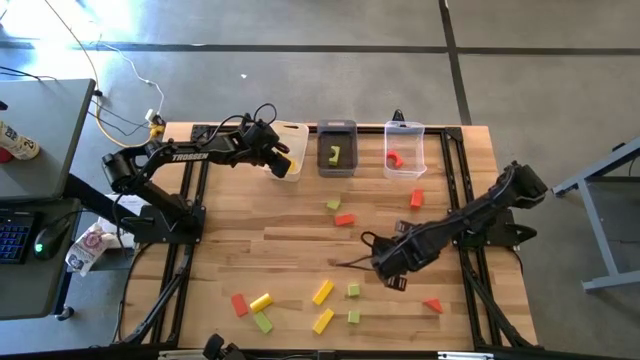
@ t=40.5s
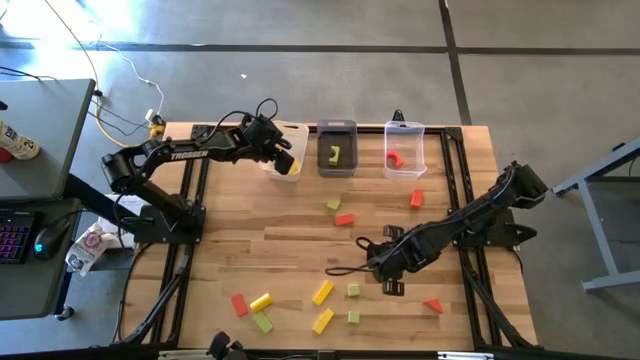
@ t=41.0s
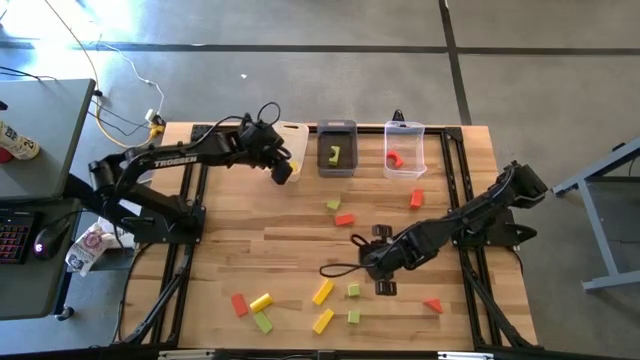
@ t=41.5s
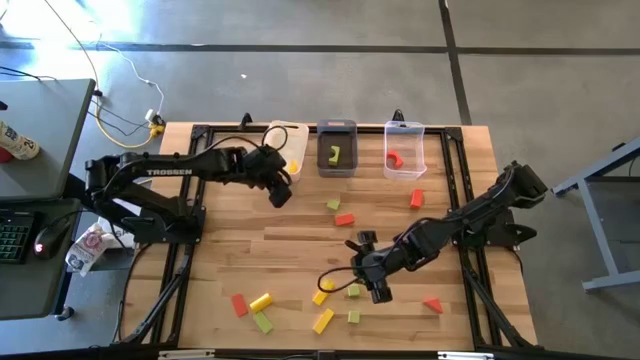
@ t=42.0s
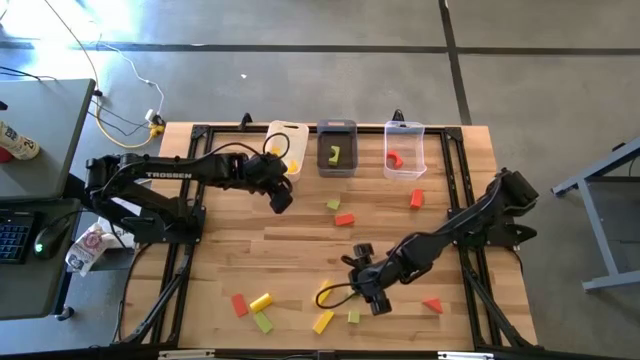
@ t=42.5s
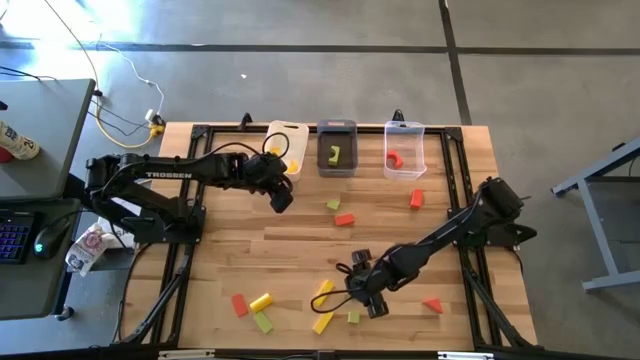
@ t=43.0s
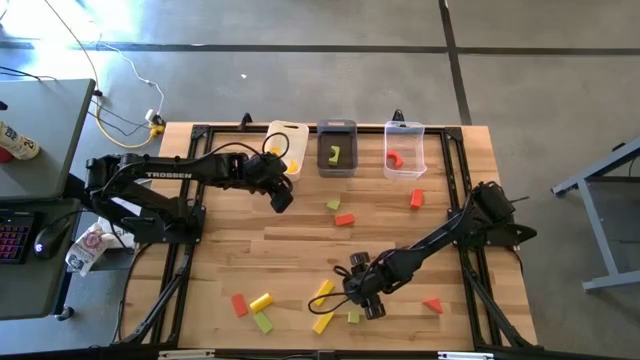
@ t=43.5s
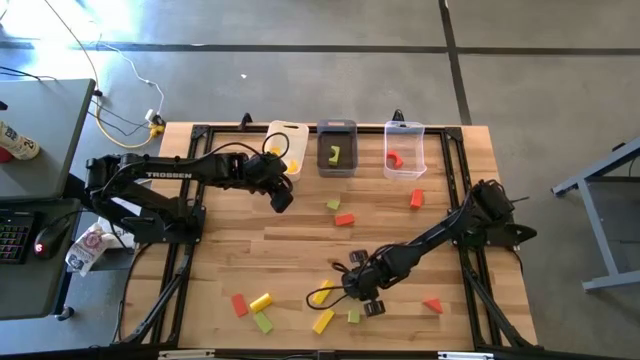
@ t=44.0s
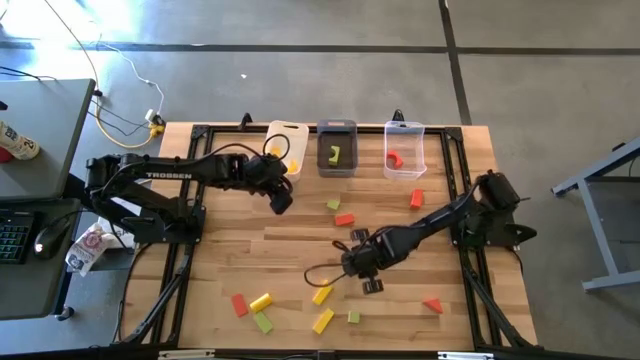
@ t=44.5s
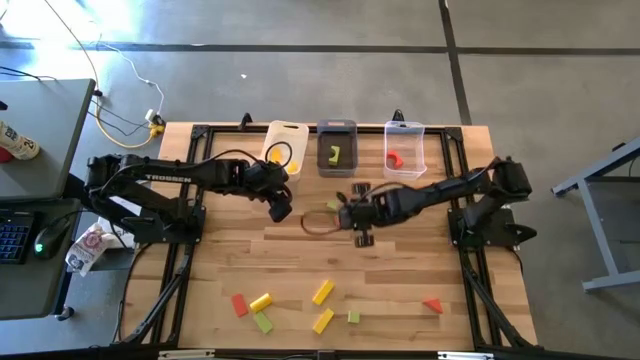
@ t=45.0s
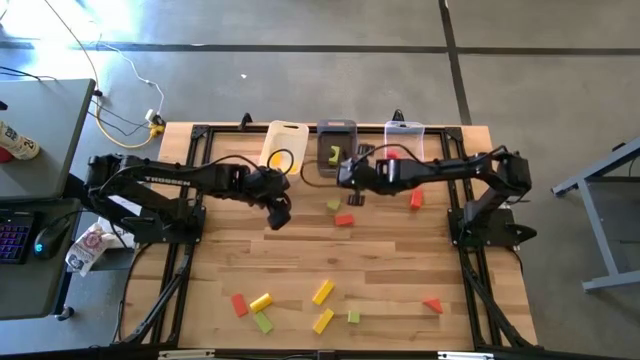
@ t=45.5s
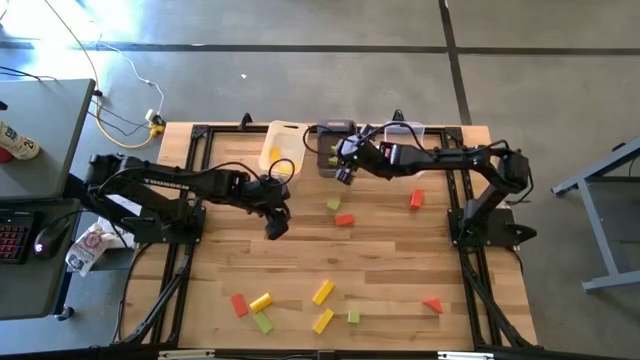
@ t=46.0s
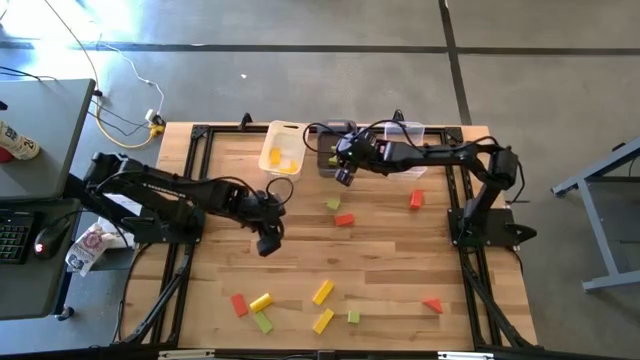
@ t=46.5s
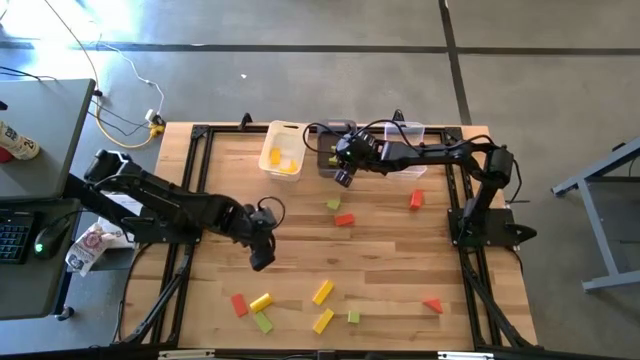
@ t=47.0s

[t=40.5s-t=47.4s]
Task: Sort & place blocks by color
Put the green block into the black bin

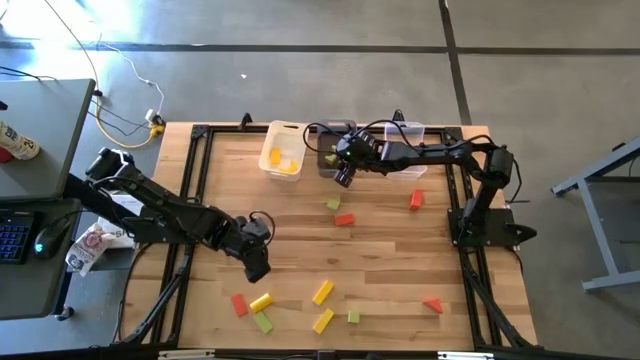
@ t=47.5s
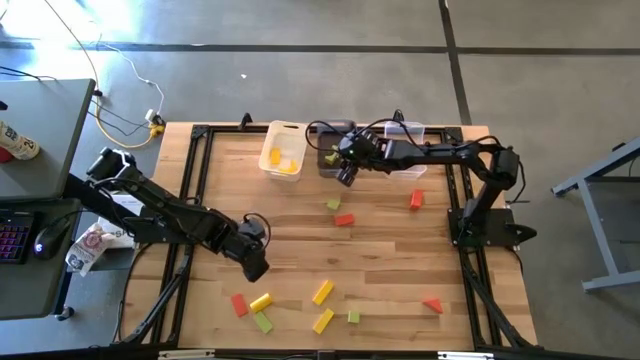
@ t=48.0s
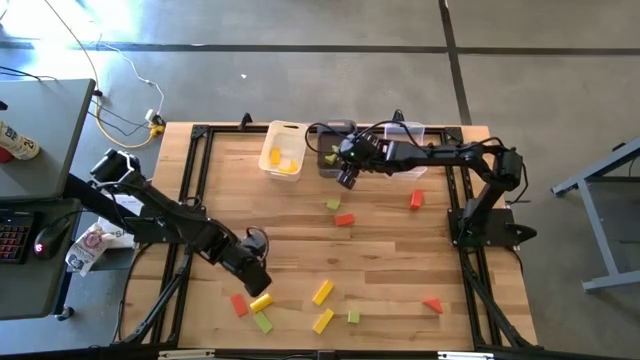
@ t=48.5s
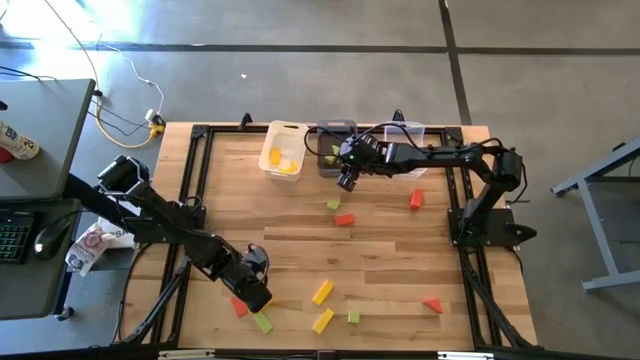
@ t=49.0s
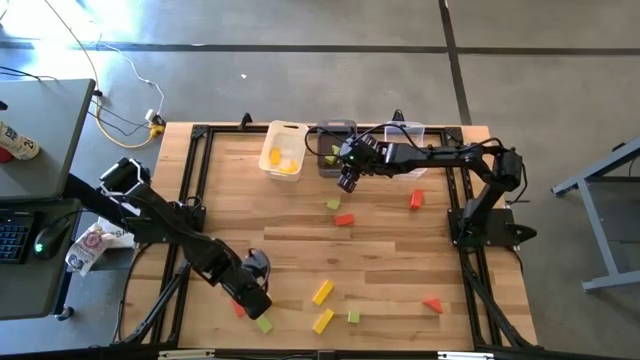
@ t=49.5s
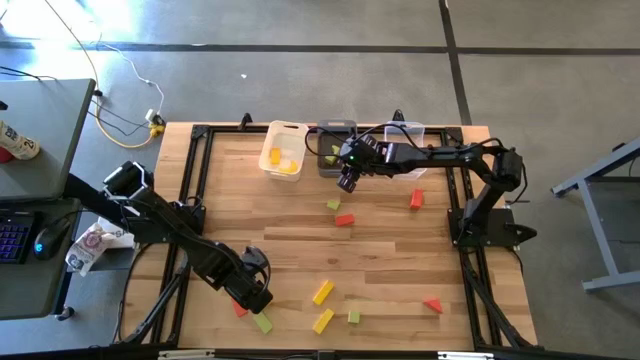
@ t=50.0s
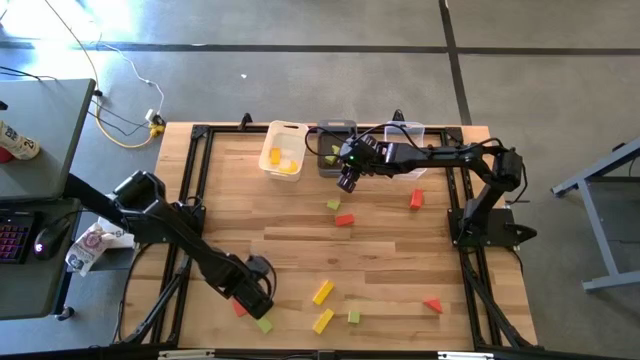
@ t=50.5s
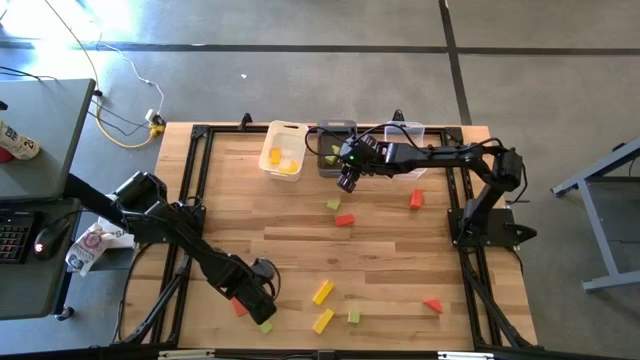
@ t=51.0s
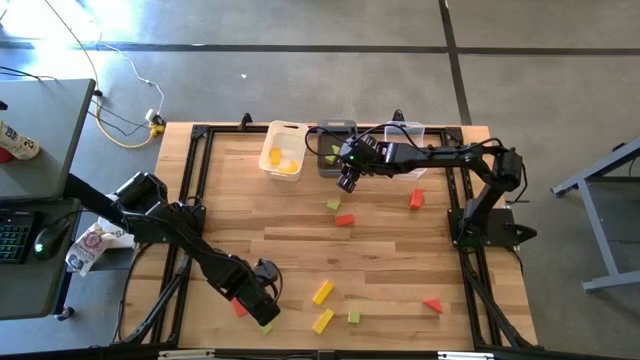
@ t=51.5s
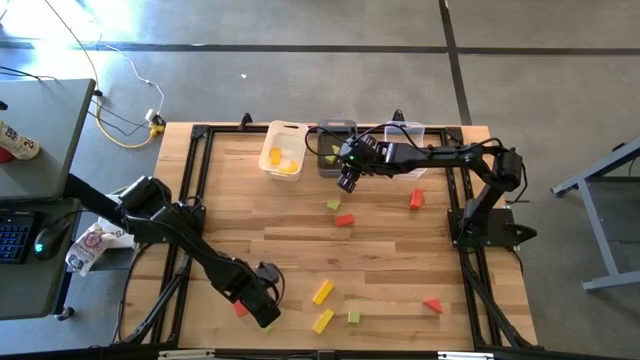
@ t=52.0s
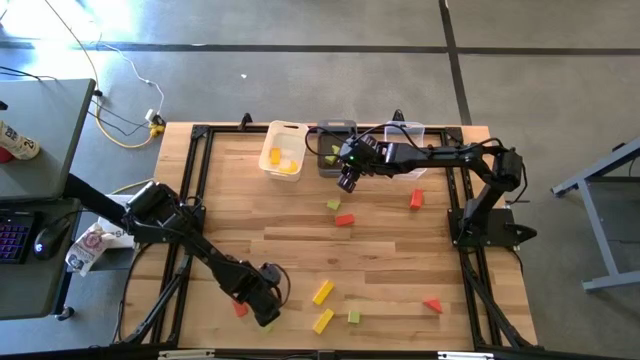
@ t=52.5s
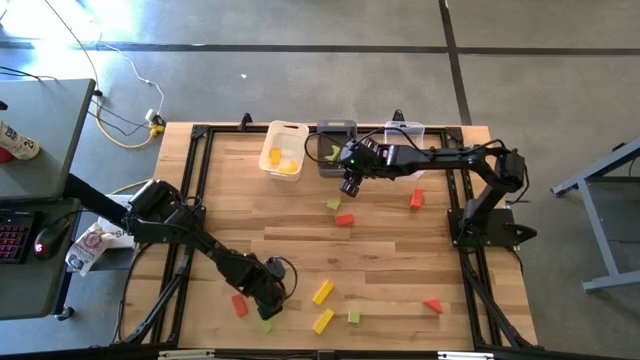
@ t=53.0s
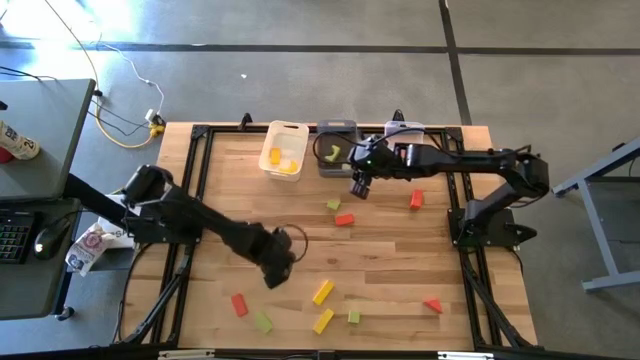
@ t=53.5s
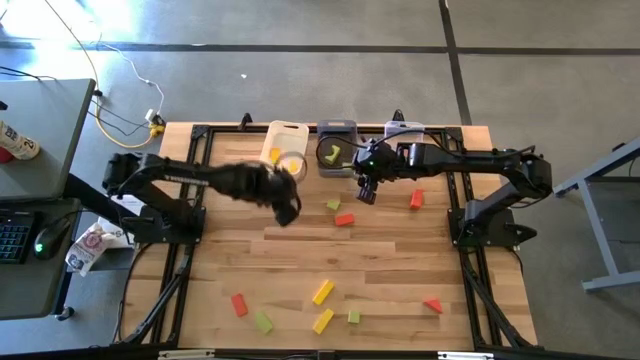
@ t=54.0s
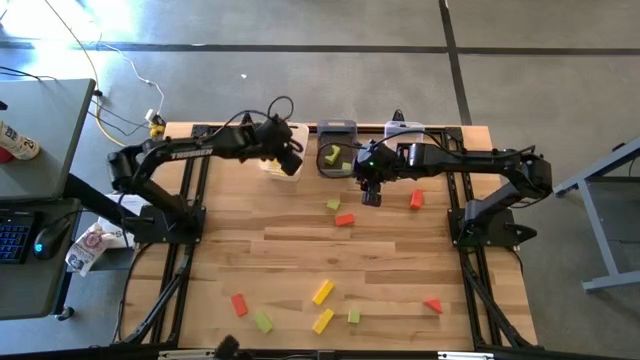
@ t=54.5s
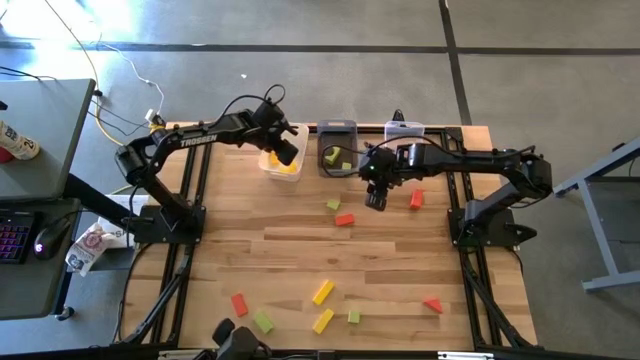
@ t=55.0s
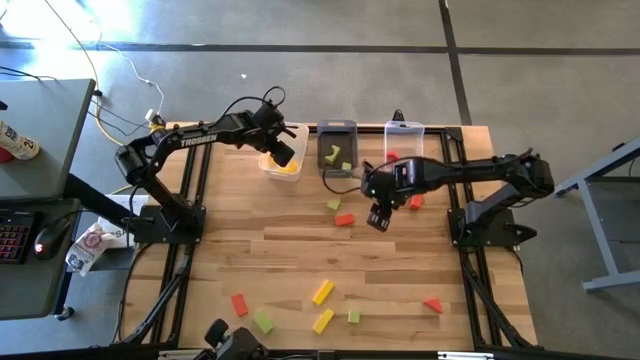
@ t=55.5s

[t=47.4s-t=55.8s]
Put the yellow block into the white bin

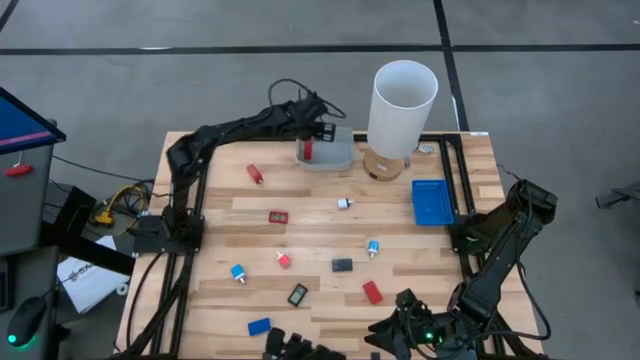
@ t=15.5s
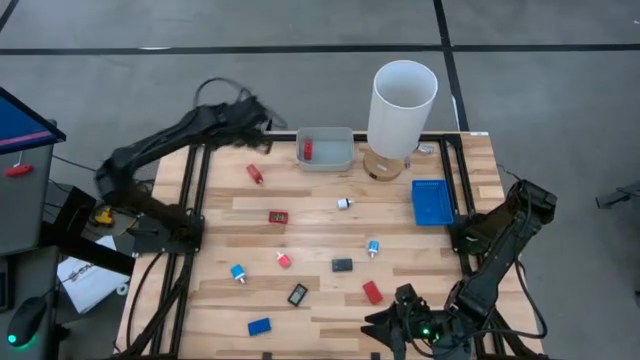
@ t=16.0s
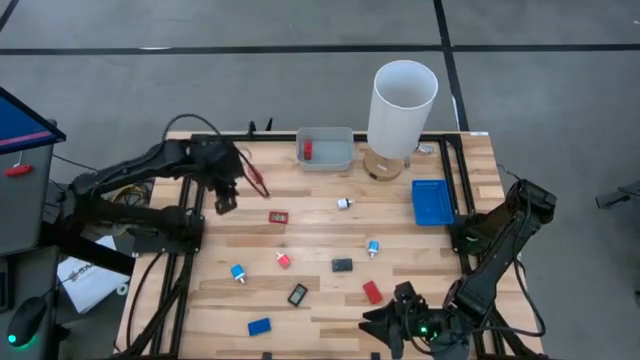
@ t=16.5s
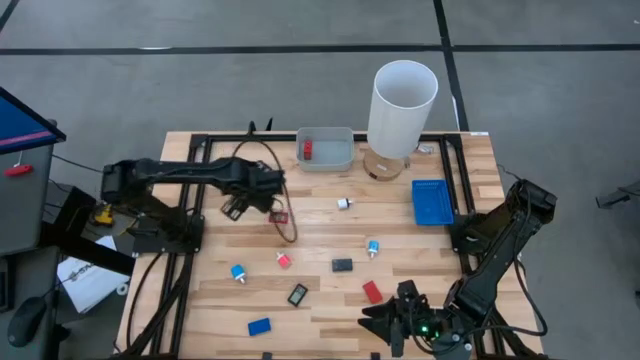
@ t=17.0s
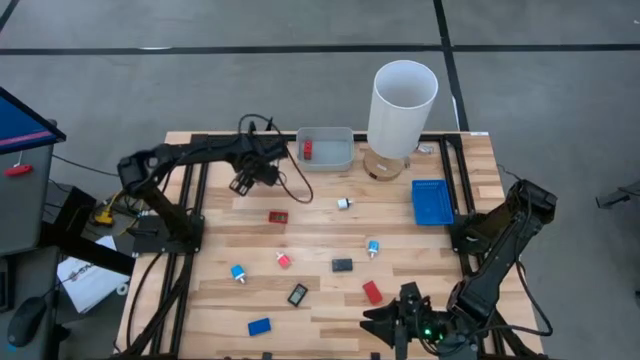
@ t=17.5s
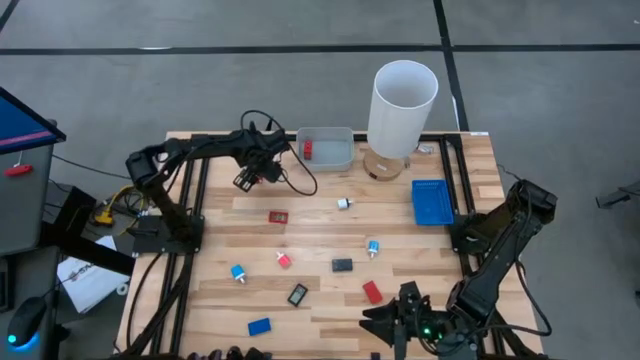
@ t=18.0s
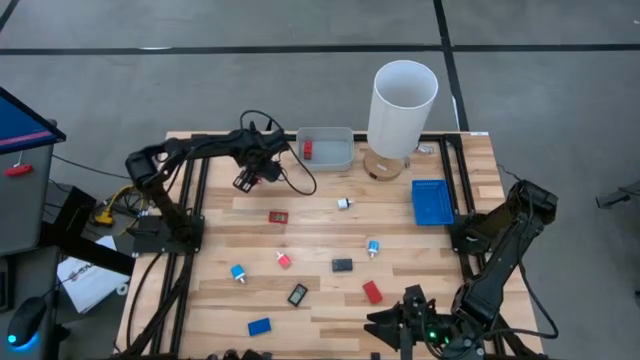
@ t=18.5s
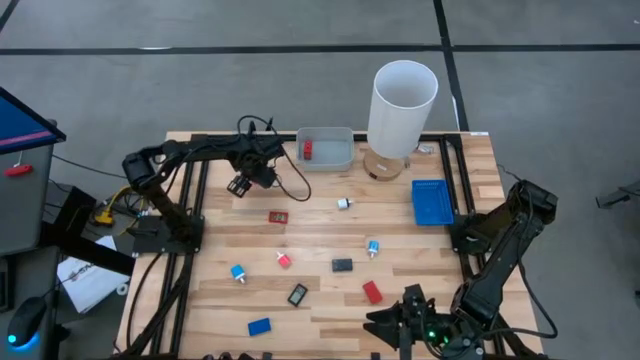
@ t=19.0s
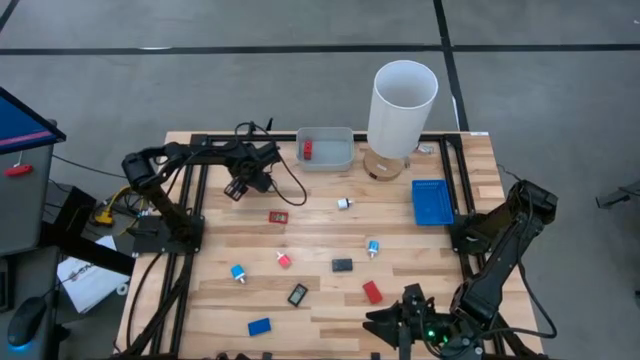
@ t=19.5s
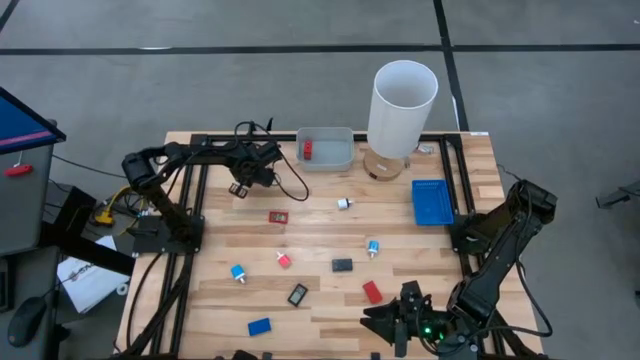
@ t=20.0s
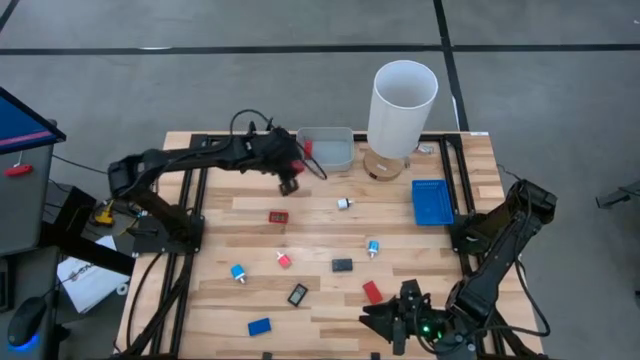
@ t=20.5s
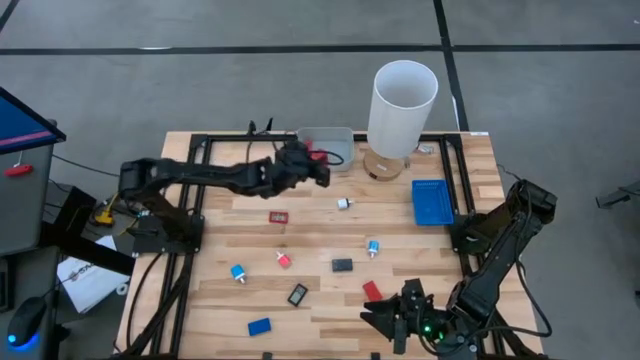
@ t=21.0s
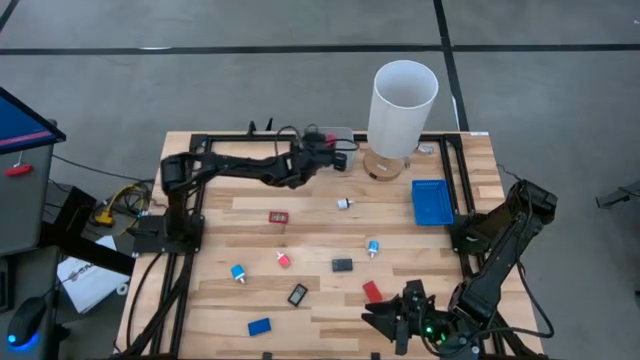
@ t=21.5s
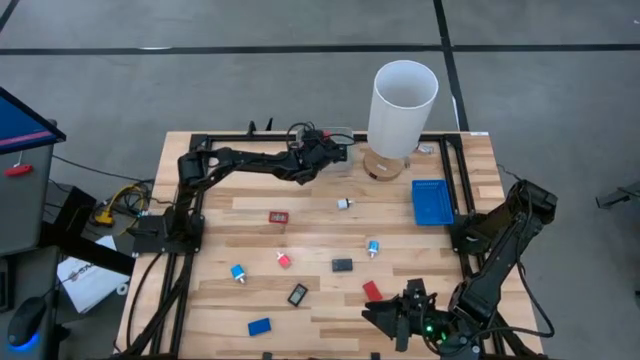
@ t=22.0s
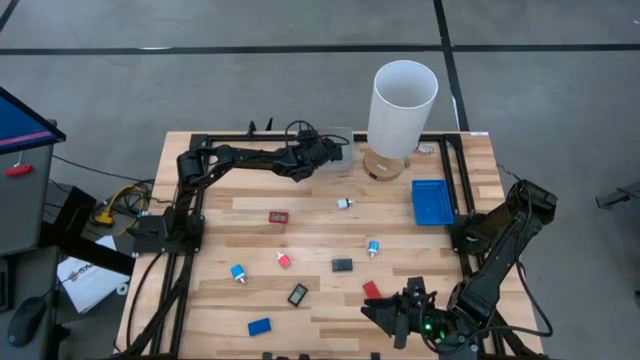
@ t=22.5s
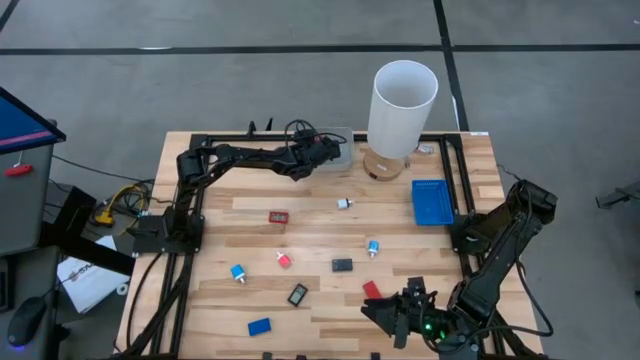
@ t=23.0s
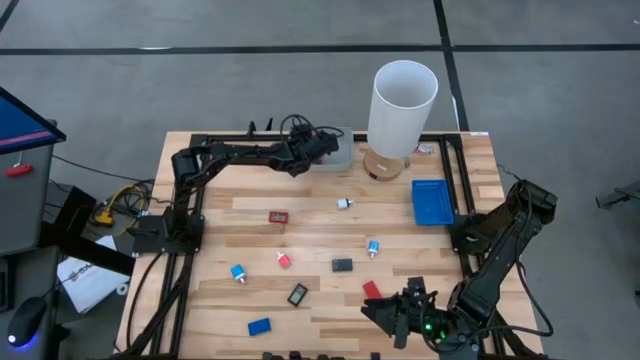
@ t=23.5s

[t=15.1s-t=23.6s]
Task: Pick & Place Office items
Put the red charger adapter into the gray bin
